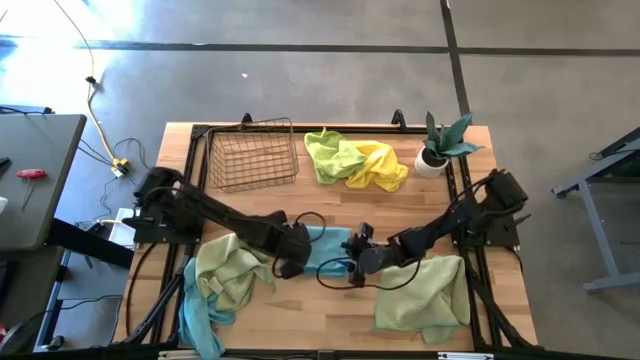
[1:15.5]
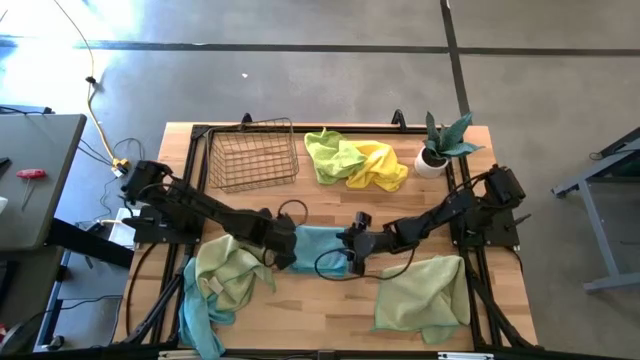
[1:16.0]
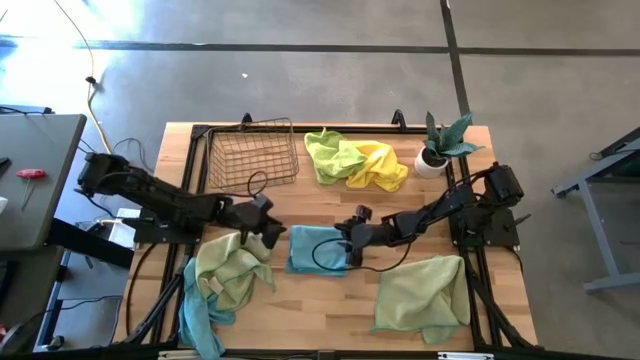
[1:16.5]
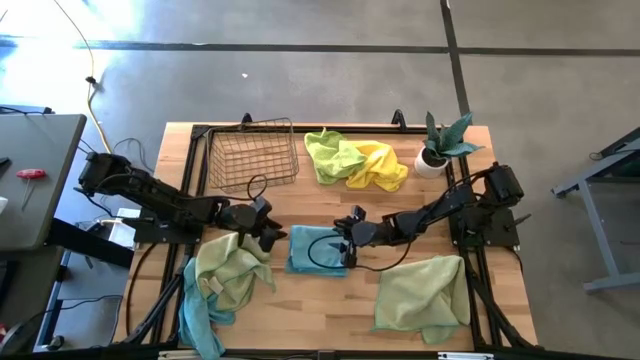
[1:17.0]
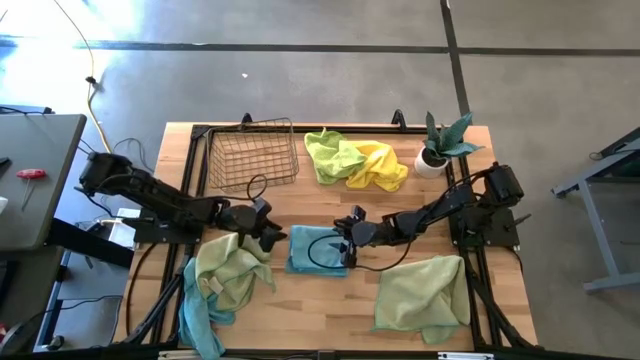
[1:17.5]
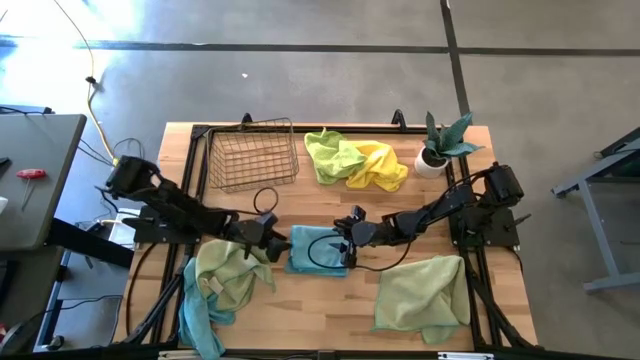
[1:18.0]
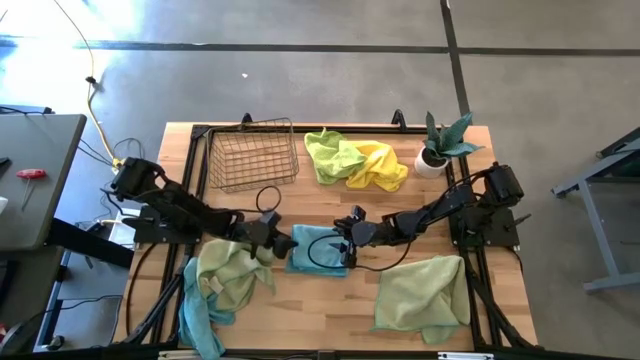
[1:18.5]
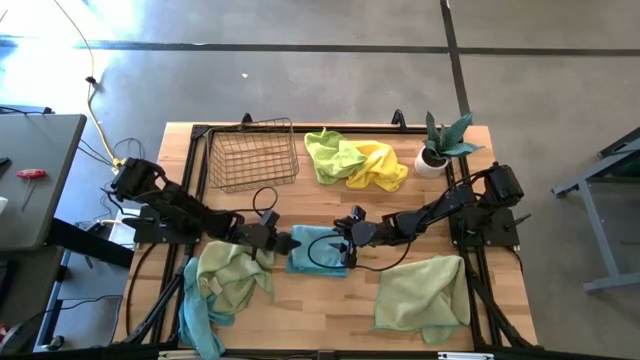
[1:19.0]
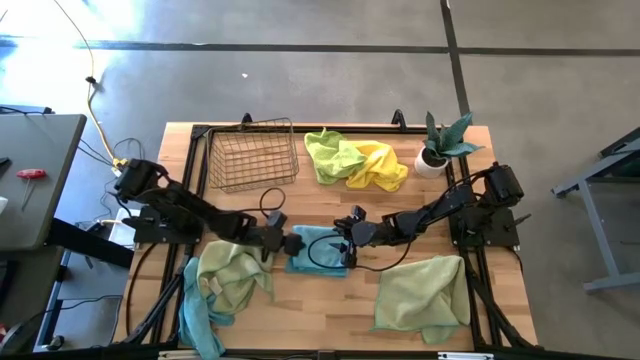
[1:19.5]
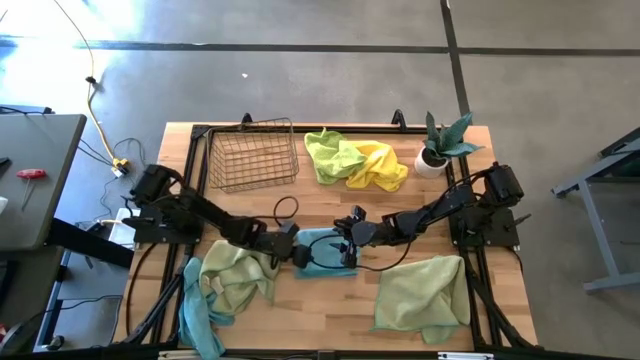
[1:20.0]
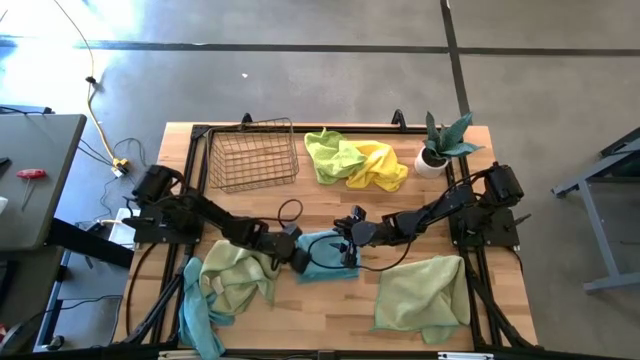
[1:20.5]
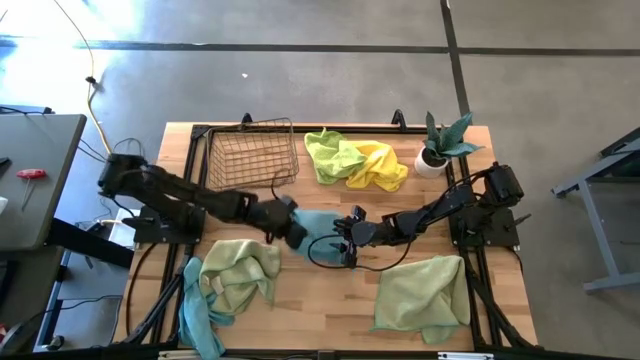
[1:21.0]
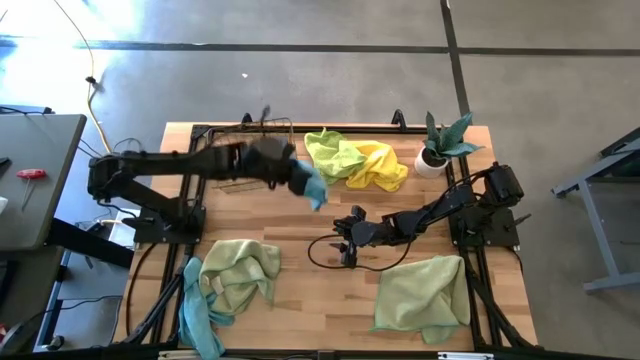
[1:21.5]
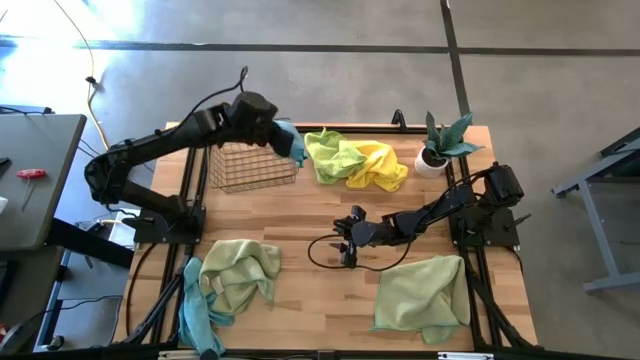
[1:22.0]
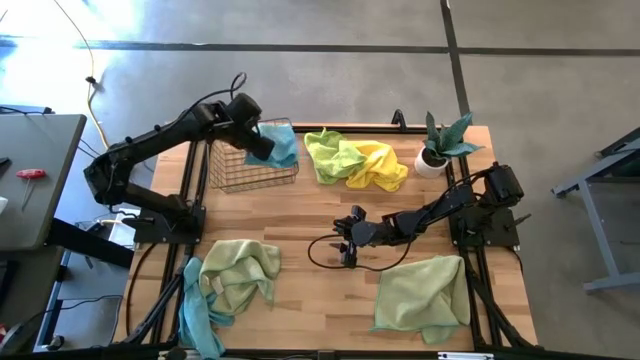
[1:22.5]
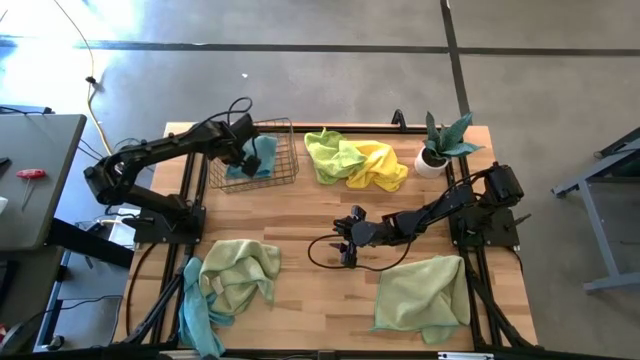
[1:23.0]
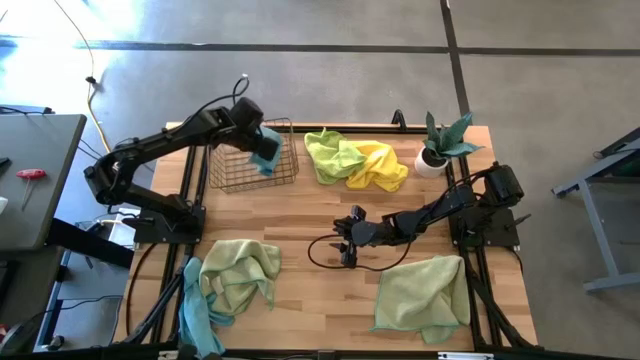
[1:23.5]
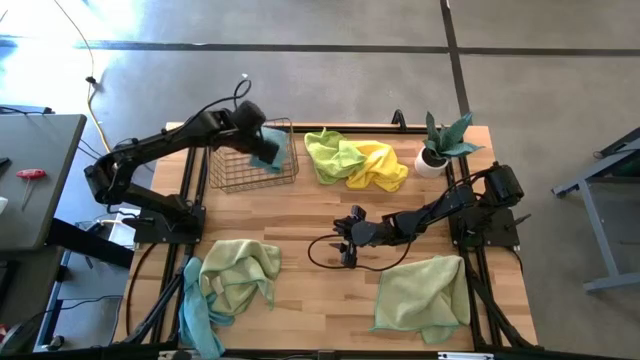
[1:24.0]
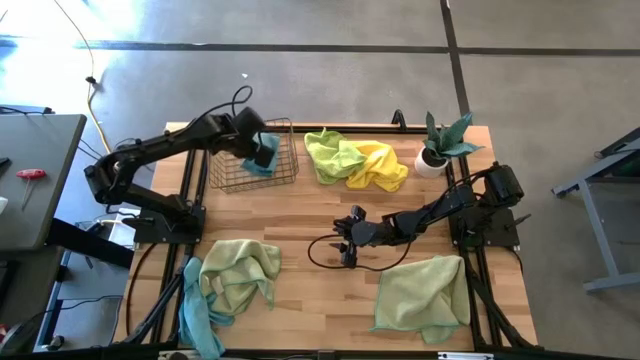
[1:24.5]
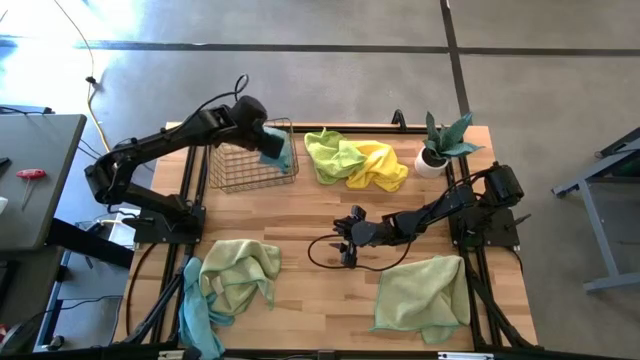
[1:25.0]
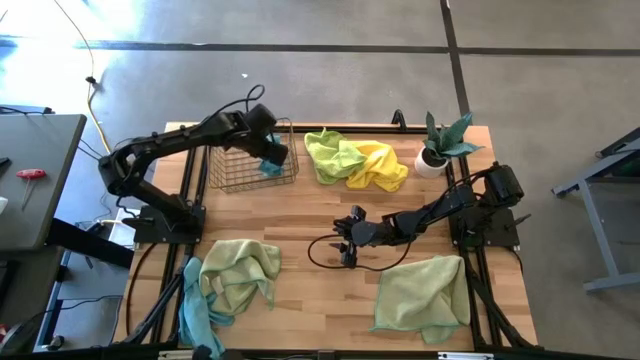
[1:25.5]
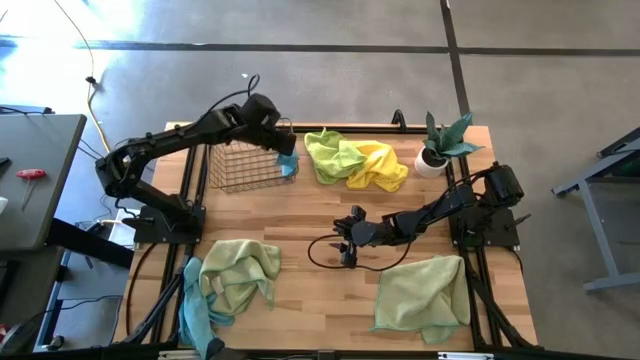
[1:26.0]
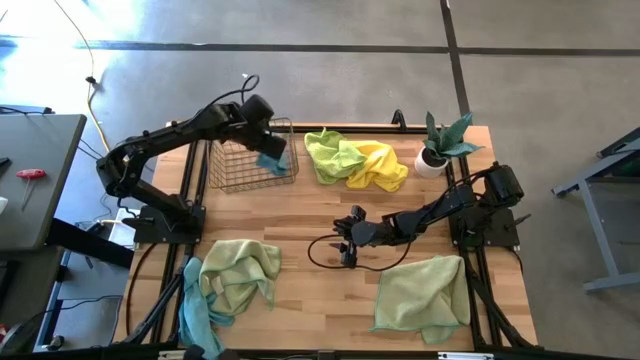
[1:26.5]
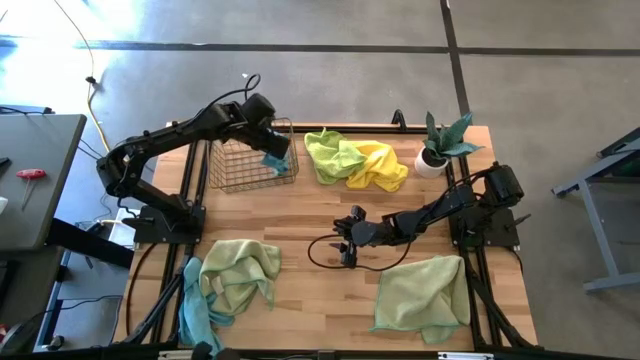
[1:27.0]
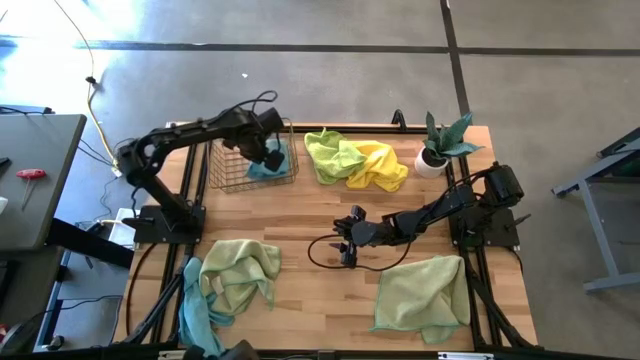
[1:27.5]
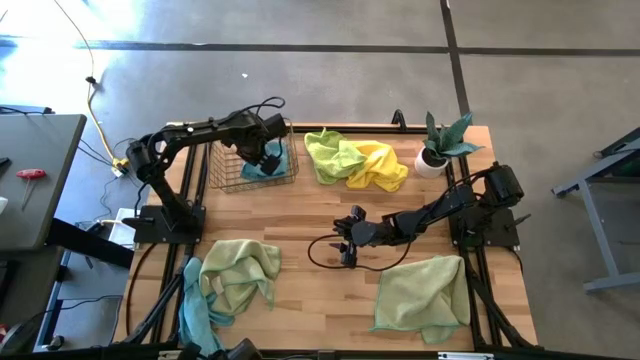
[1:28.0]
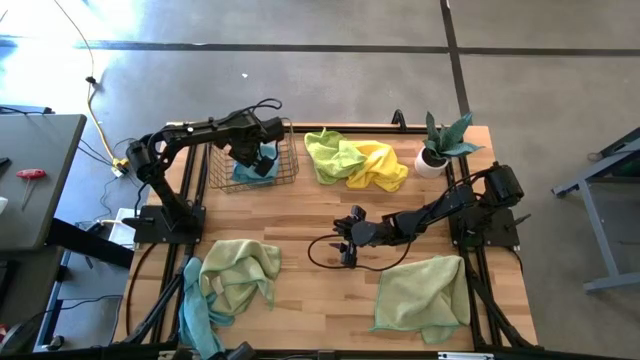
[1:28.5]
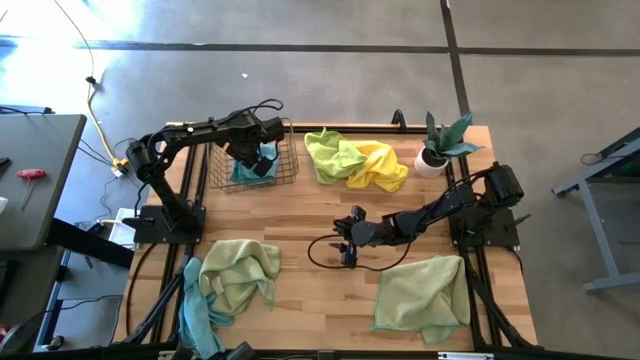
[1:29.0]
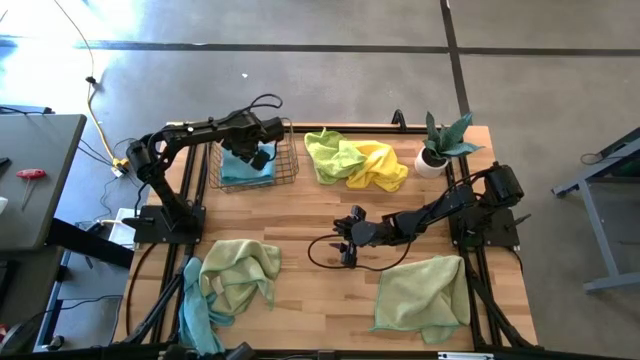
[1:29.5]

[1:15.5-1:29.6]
Task: Fold microfiber towels
Put the folded blue towel into the wire basket

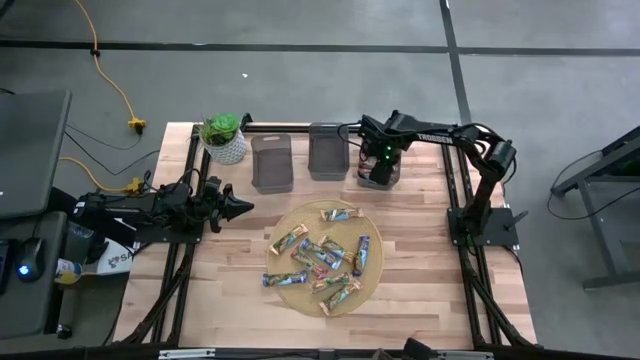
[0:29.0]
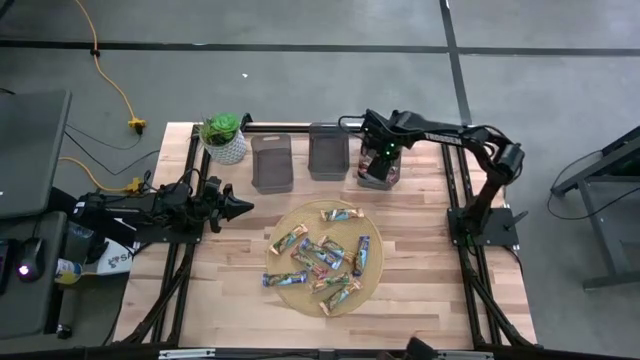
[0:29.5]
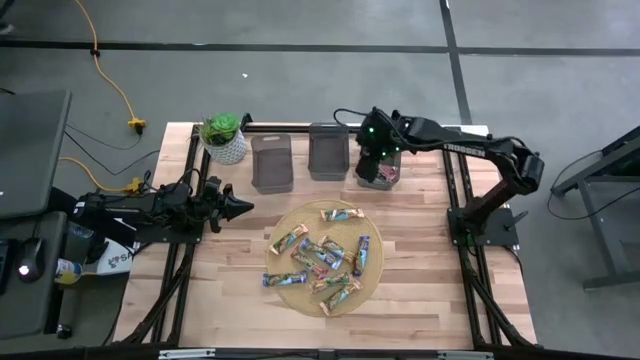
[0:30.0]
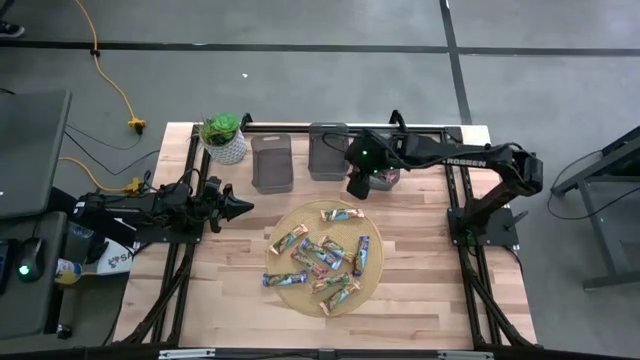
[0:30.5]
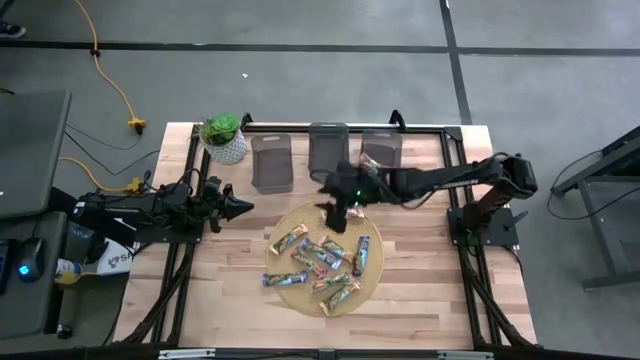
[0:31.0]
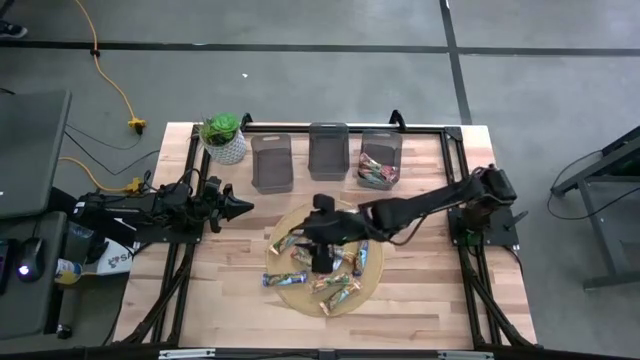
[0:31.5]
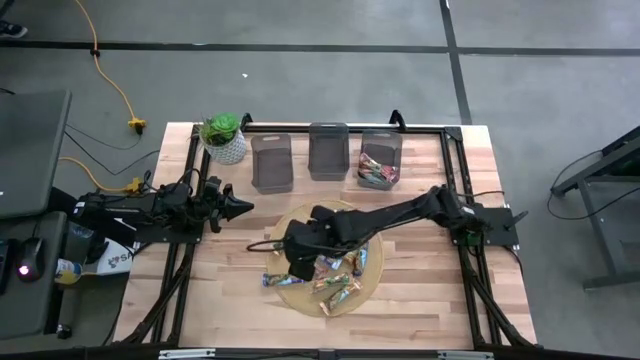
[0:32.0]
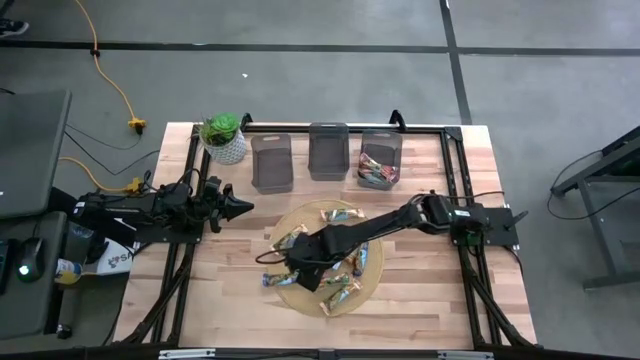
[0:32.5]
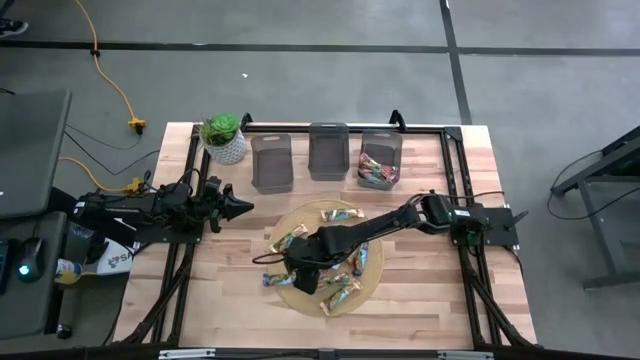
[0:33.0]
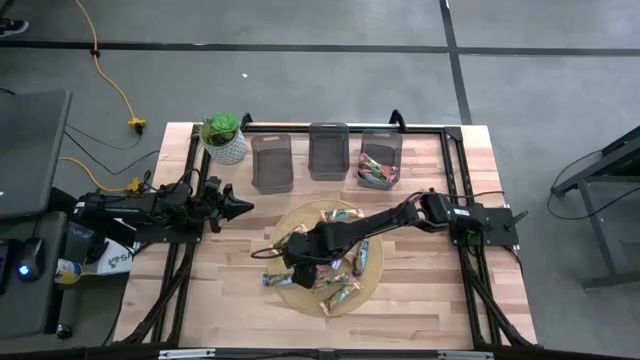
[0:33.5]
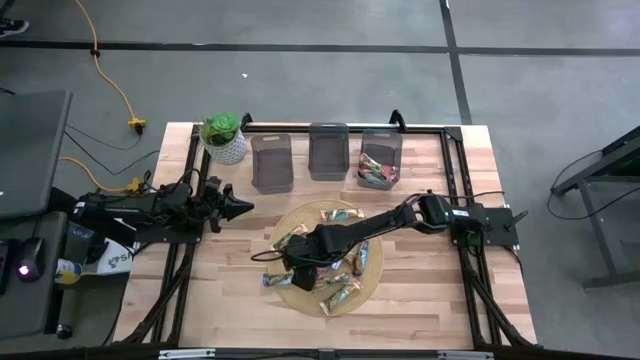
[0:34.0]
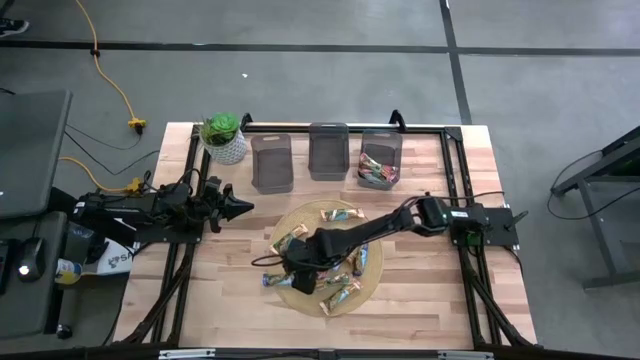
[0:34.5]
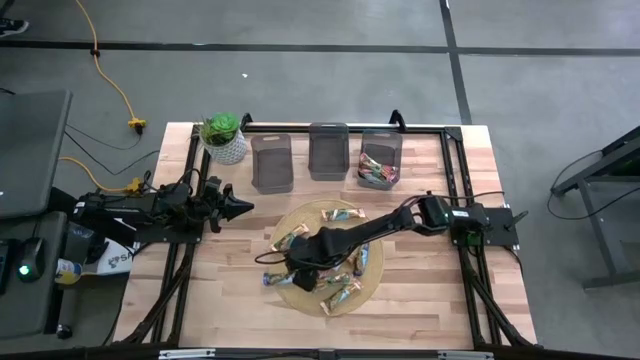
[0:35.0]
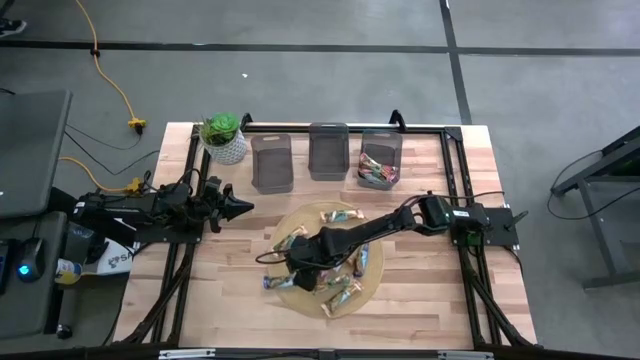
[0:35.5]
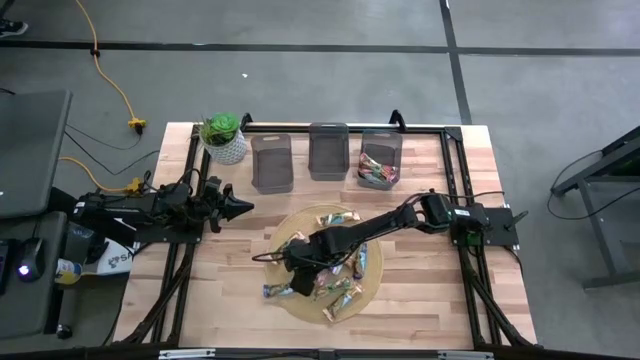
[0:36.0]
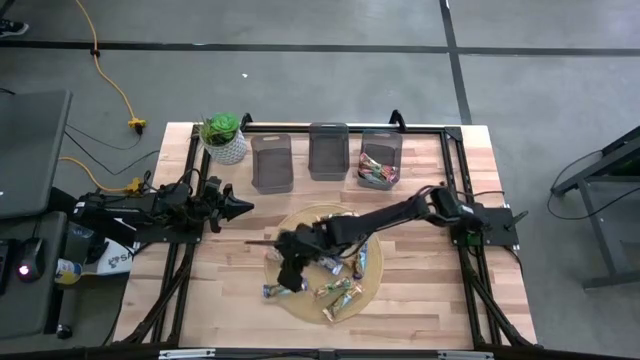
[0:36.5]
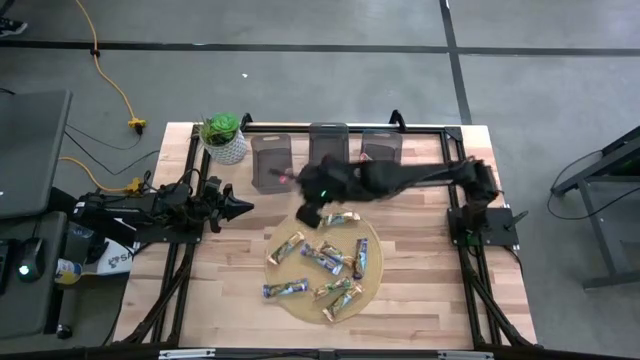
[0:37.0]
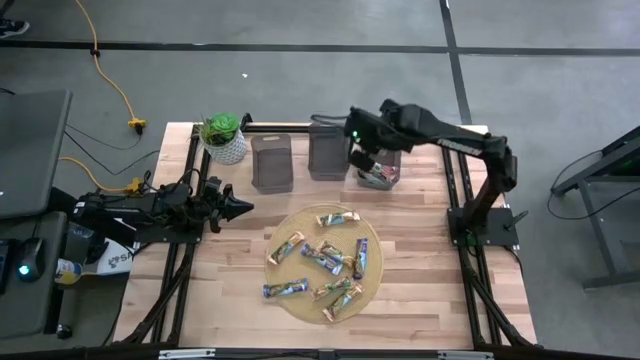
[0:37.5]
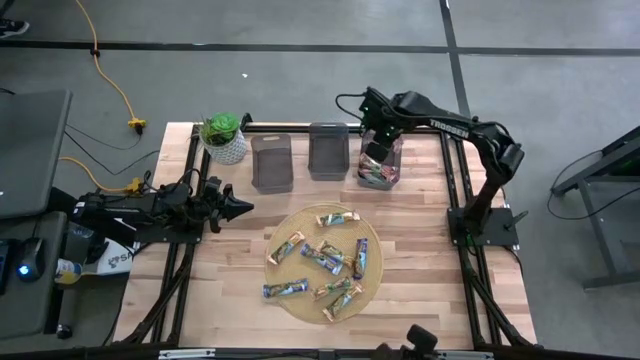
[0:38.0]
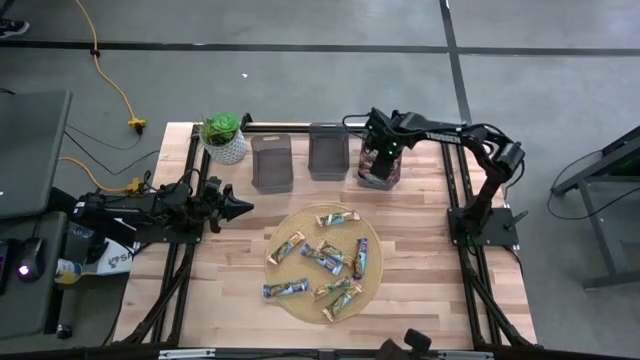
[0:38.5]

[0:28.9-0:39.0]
Task: Pick and place Granola Bars by type
Put the orange granola bar into the right black bin
